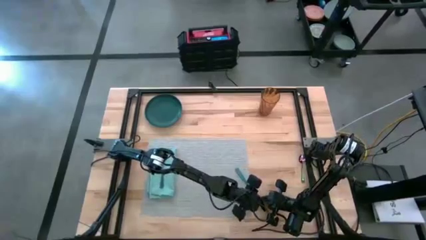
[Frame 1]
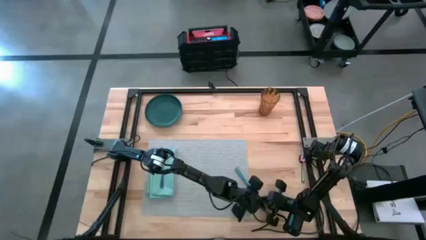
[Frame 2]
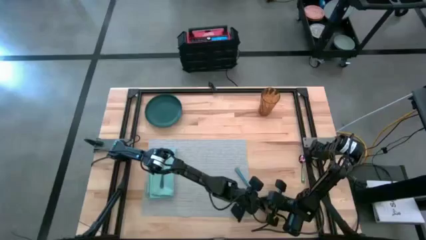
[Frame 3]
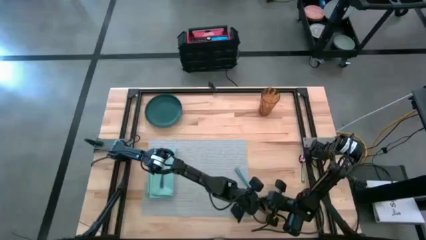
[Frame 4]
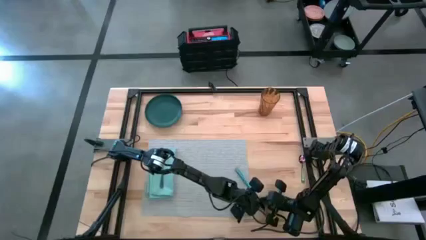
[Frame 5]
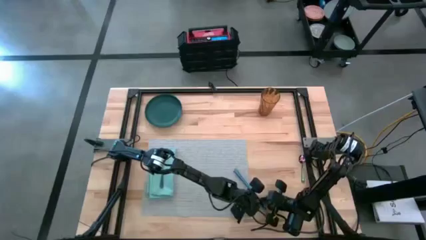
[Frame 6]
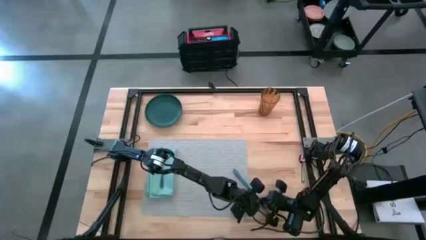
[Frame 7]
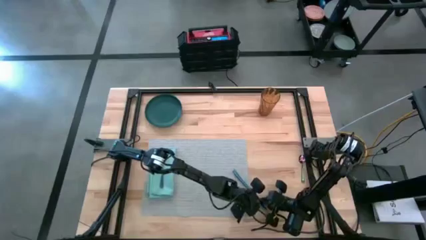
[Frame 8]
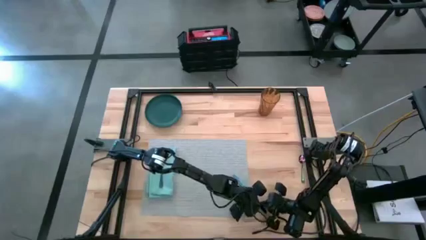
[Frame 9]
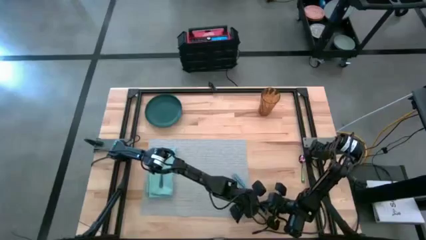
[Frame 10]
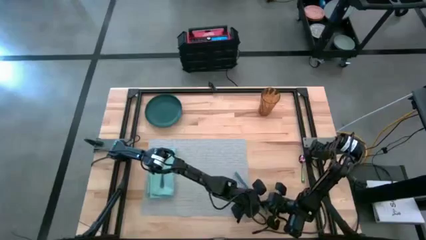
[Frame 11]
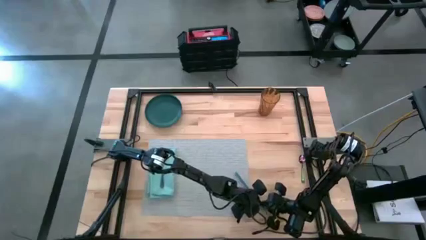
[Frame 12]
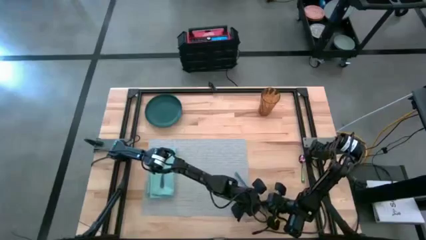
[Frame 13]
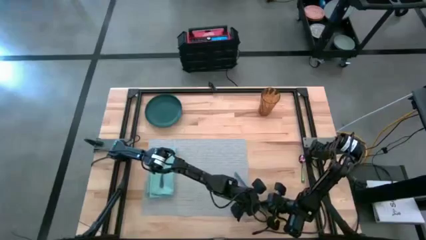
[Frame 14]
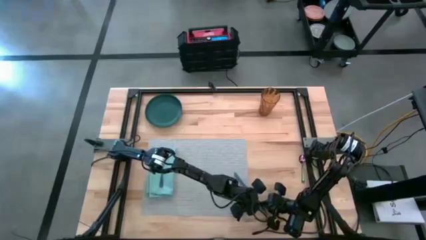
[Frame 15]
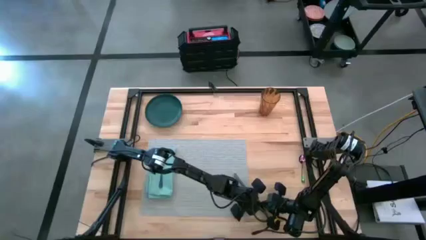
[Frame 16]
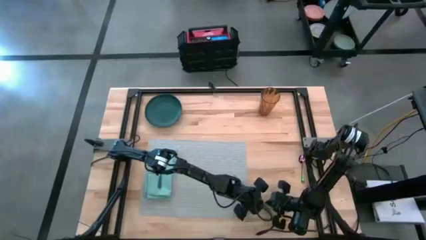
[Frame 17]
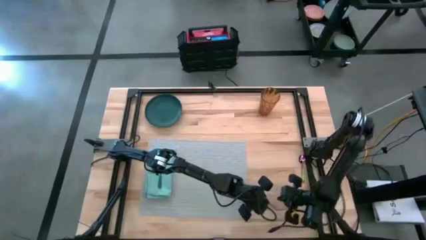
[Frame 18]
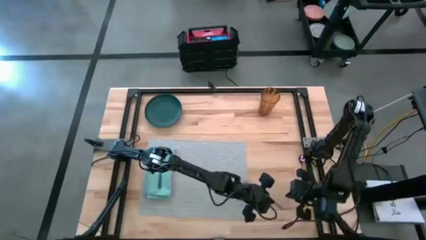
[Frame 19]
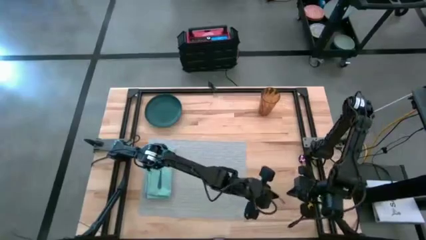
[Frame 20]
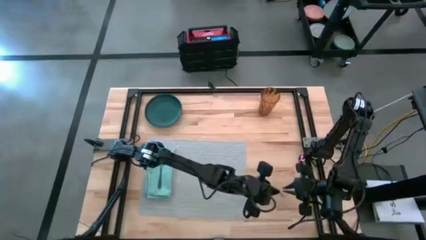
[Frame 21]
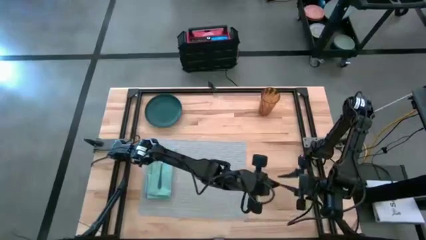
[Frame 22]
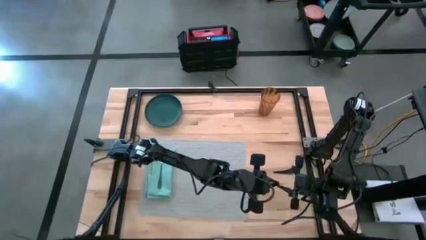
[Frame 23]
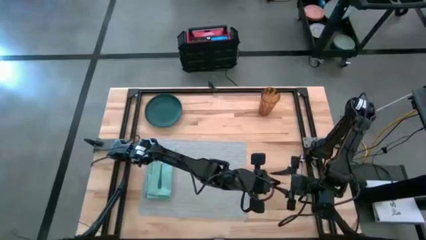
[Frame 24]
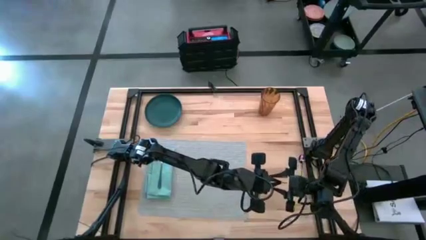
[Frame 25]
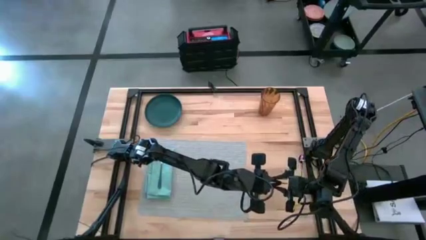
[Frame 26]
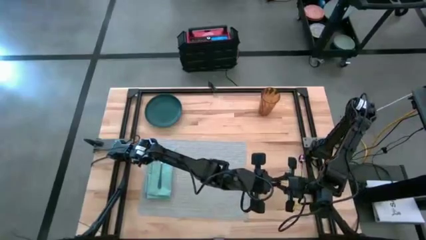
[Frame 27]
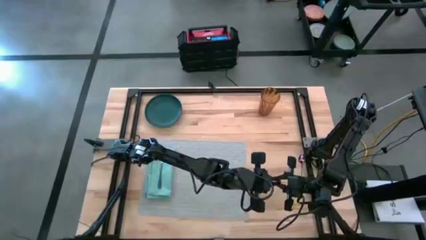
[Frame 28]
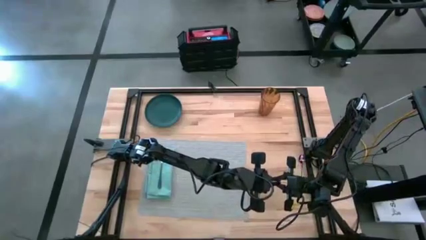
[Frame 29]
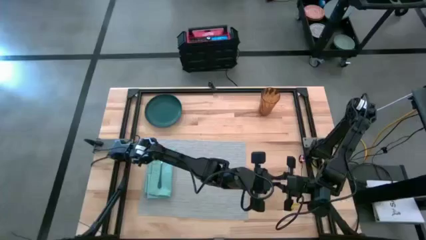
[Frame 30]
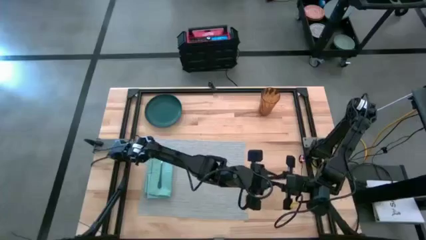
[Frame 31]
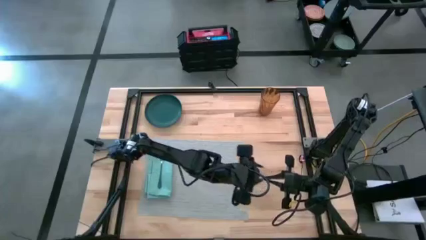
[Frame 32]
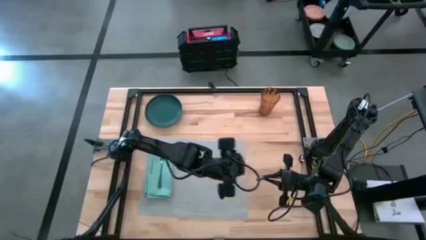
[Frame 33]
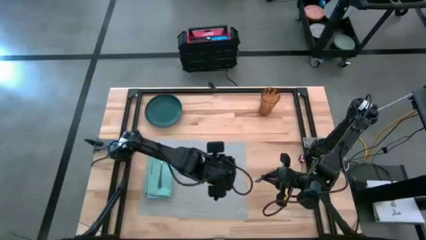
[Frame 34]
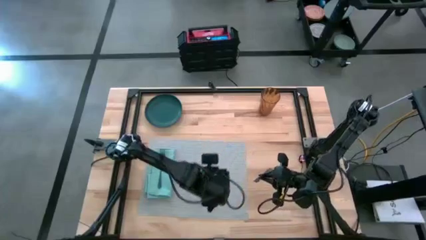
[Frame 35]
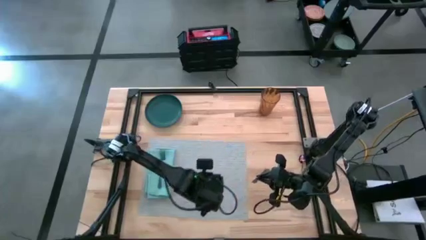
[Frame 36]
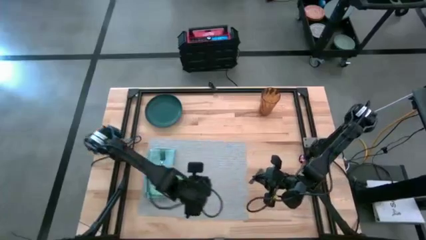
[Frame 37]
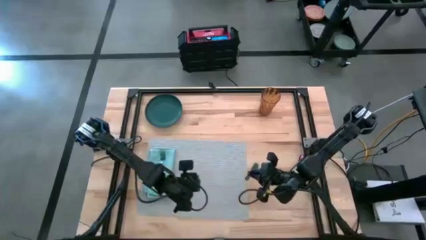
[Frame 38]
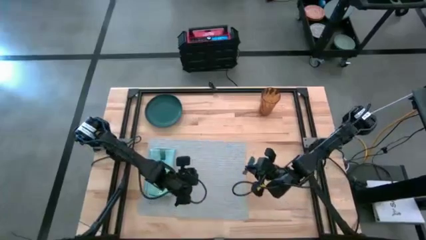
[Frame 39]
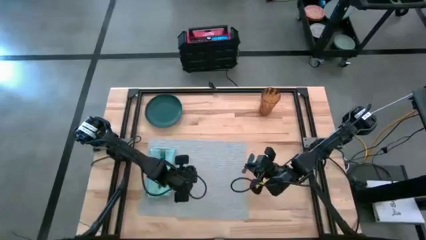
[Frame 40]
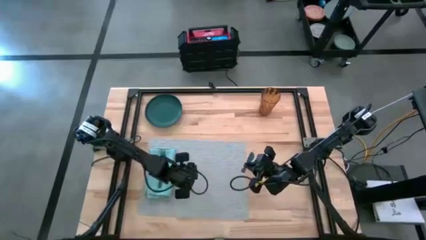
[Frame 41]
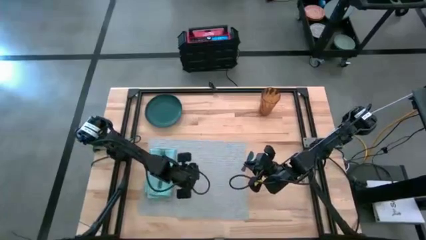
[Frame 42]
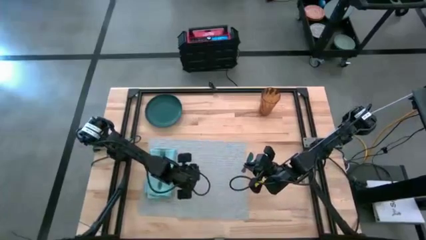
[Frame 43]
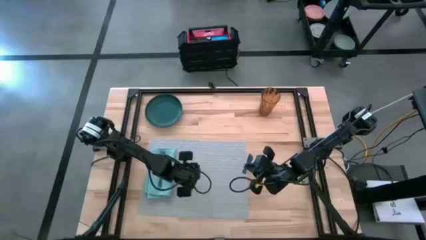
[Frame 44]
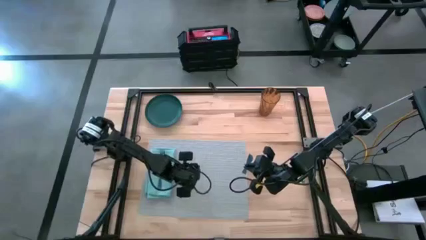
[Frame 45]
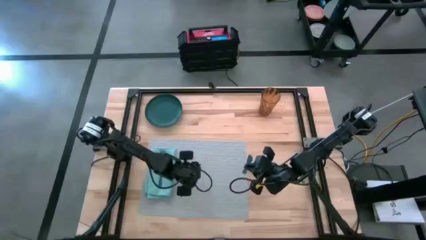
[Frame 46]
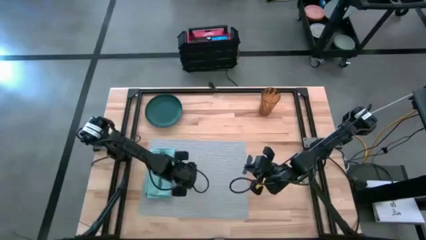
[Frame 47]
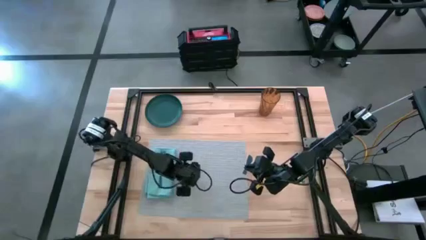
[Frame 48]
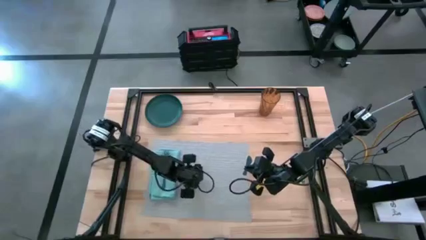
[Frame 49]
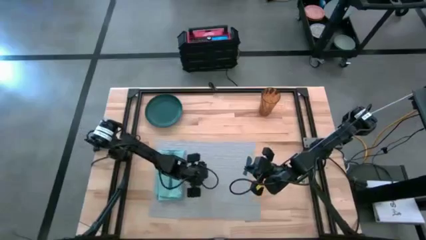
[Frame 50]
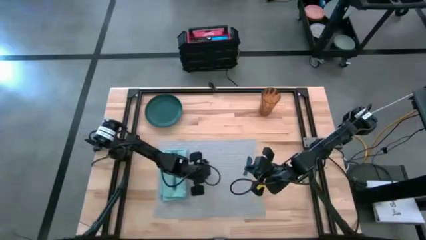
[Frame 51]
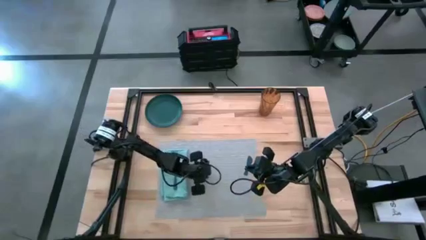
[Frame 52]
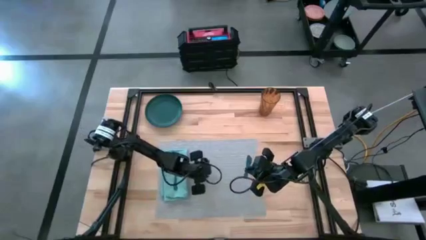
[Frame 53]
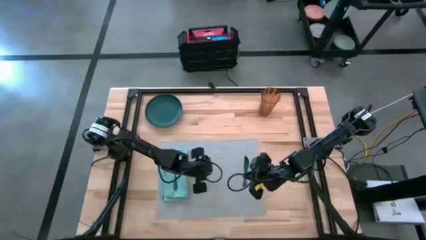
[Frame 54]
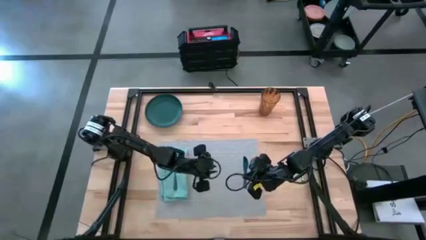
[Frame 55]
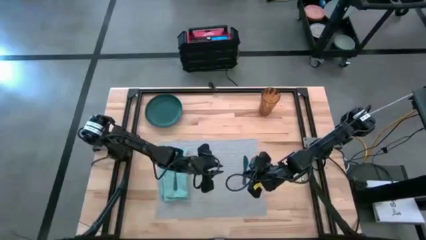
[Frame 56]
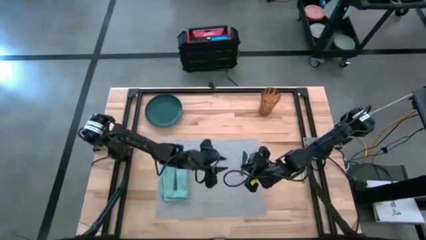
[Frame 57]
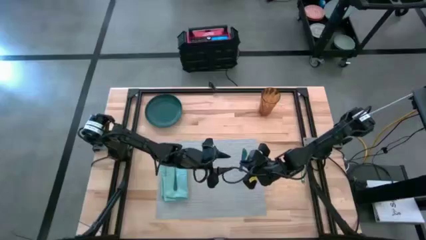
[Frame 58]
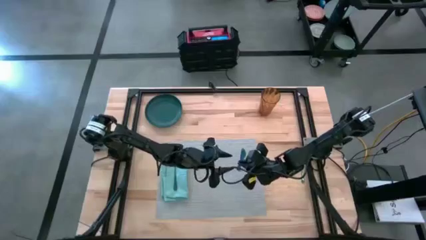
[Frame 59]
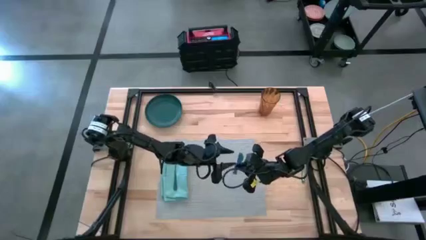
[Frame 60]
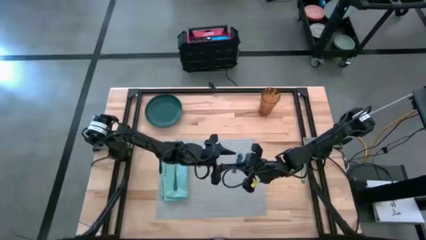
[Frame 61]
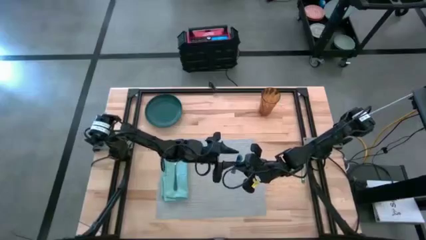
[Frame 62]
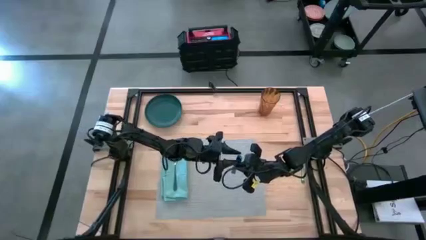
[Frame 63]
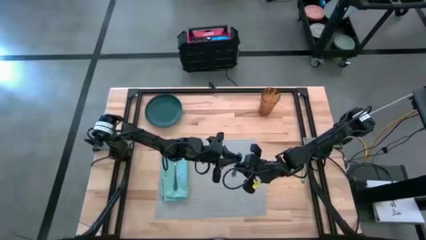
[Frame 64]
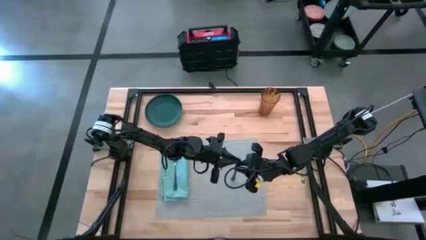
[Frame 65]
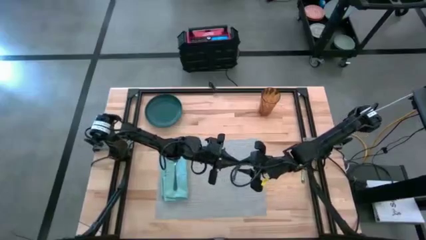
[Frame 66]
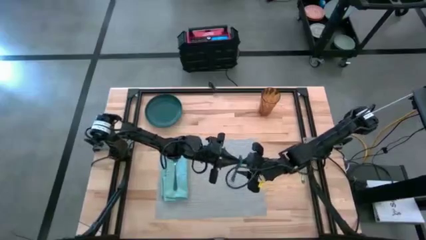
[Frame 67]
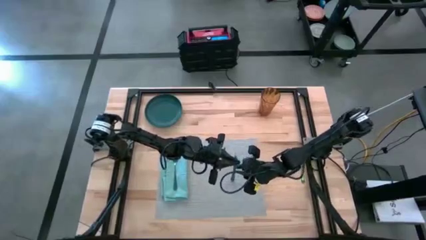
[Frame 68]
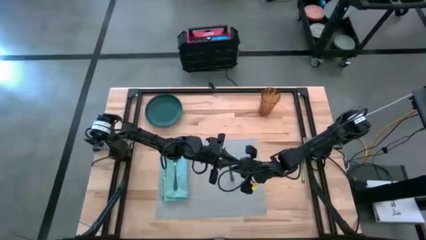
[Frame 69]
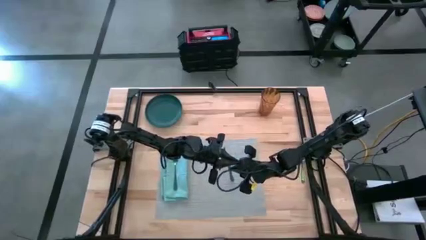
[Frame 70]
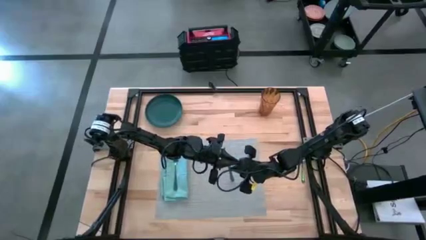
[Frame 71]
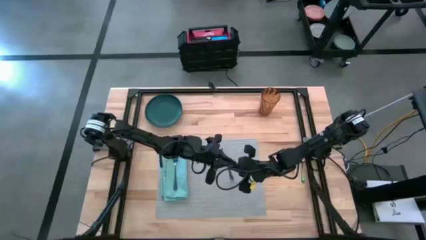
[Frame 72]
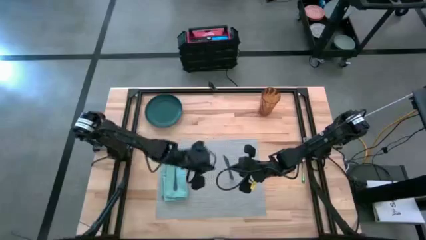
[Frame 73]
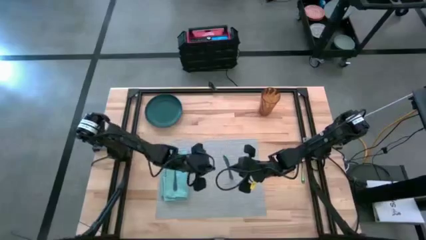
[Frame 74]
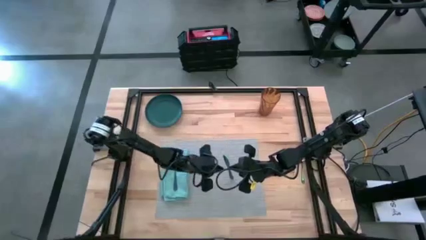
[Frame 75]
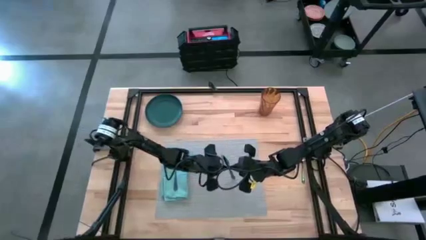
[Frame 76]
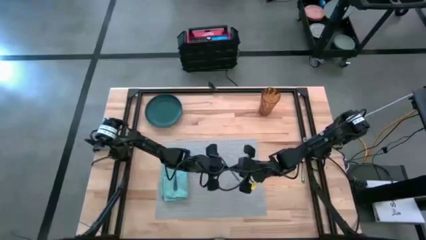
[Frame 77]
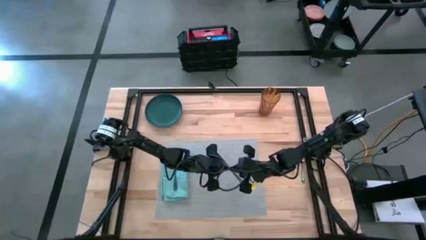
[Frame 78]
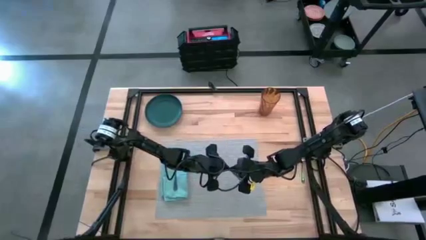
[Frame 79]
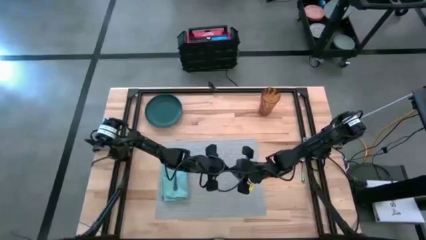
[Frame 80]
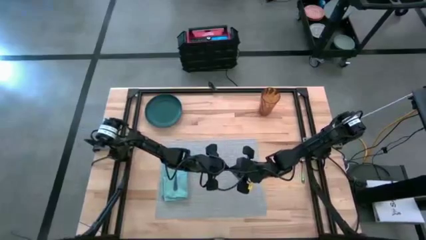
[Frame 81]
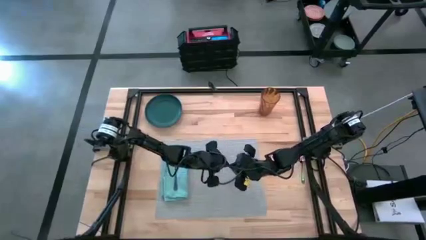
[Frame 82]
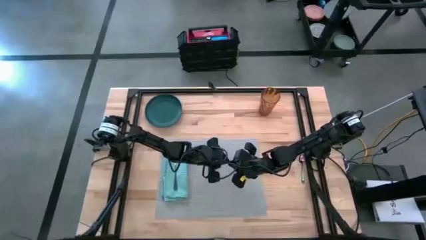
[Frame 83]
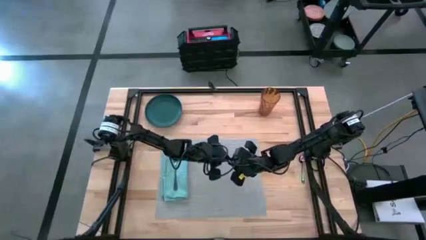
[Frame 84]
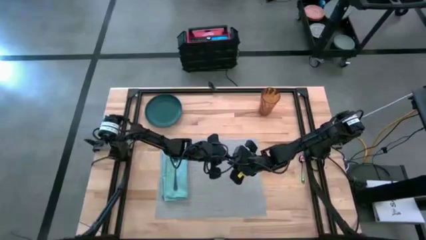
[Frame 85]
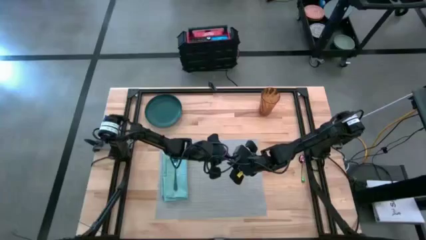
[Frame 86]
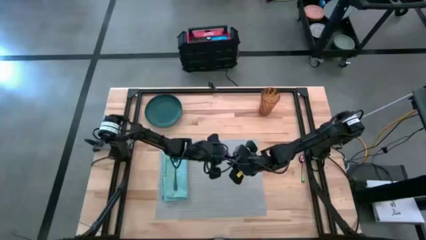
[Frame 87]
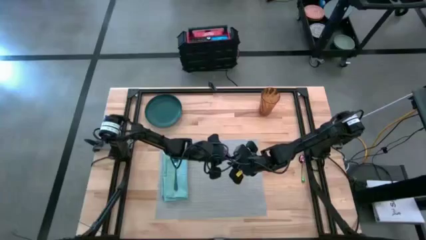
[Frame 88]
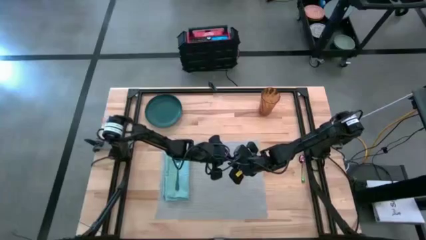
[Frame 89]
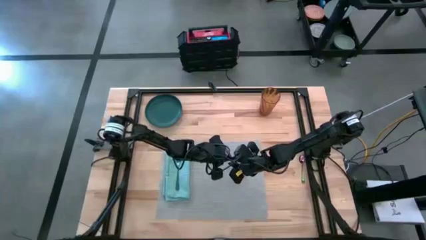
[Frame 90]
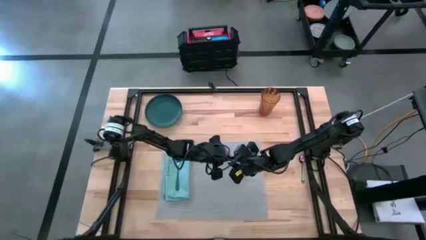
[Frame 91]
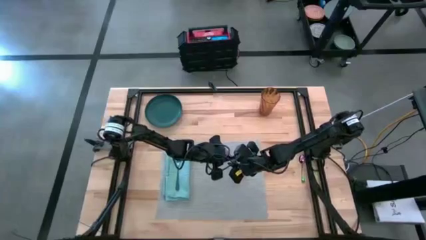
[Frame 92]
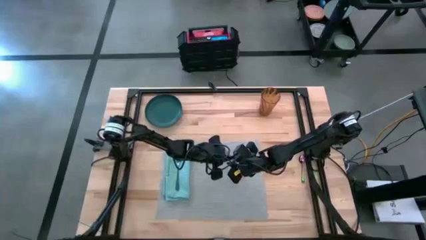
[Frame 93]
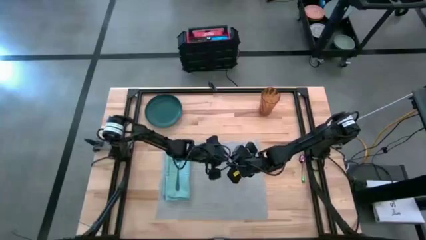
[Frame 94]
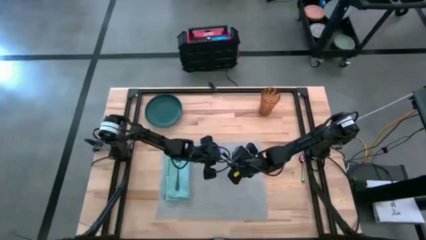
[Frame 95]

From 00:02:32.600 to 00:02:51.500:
Task: Set table place
Put the blue table knife on the right of the gray tablemat
